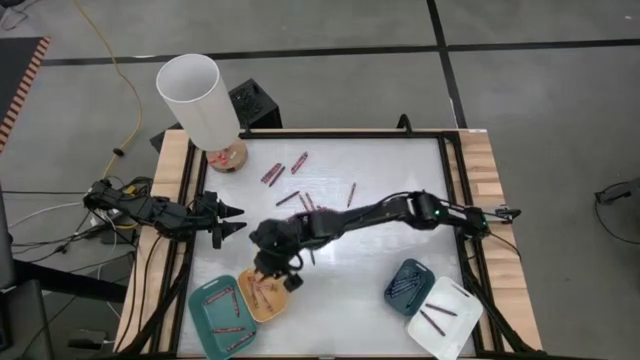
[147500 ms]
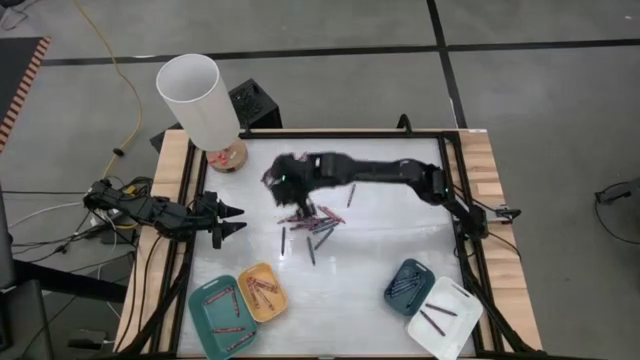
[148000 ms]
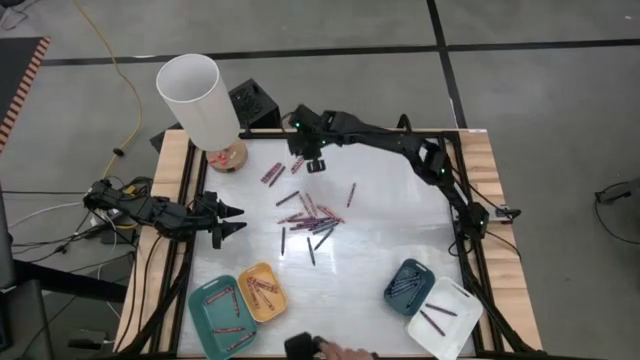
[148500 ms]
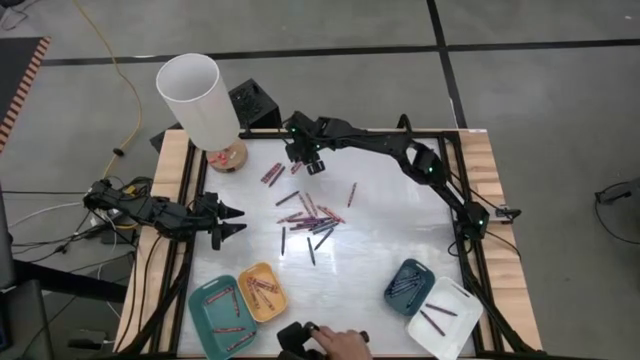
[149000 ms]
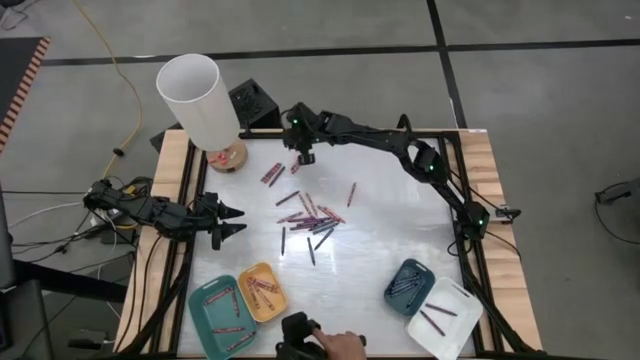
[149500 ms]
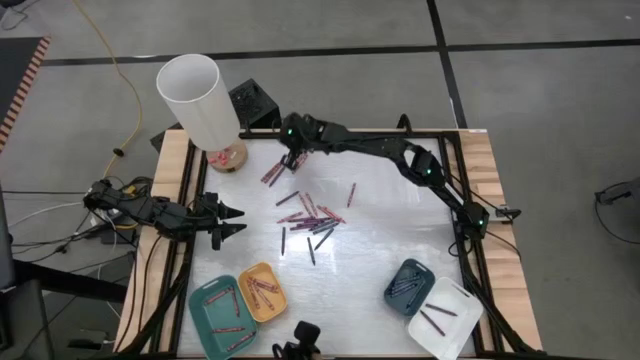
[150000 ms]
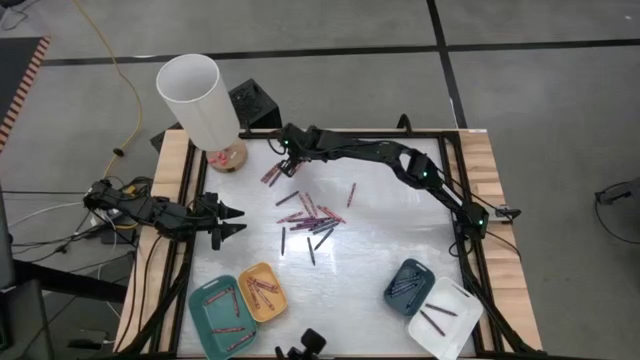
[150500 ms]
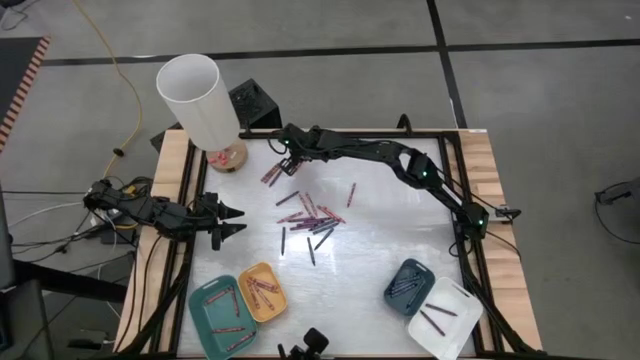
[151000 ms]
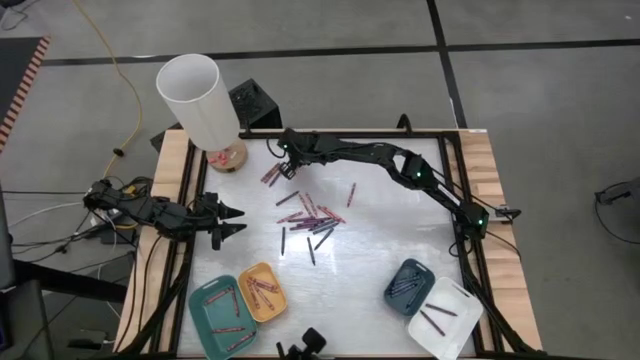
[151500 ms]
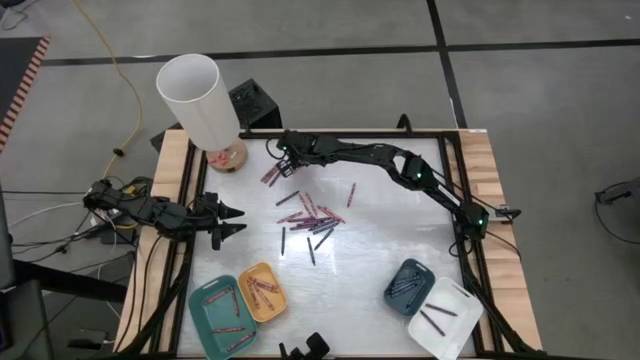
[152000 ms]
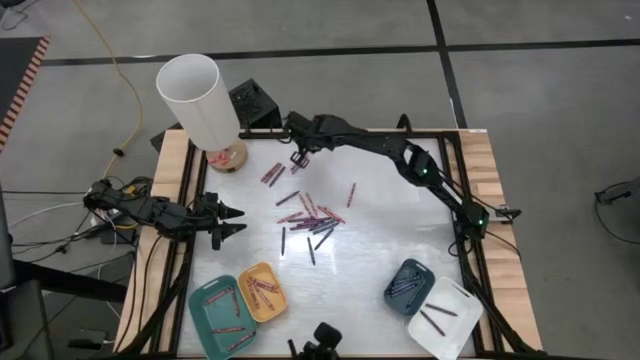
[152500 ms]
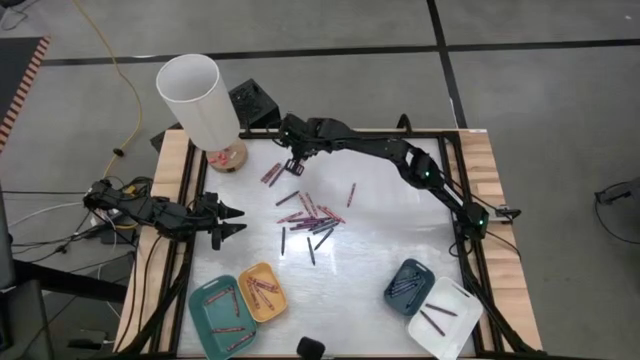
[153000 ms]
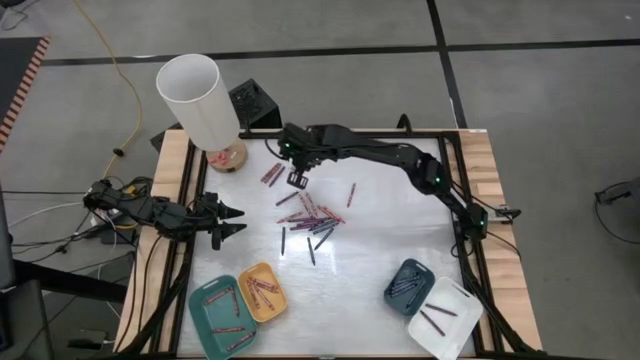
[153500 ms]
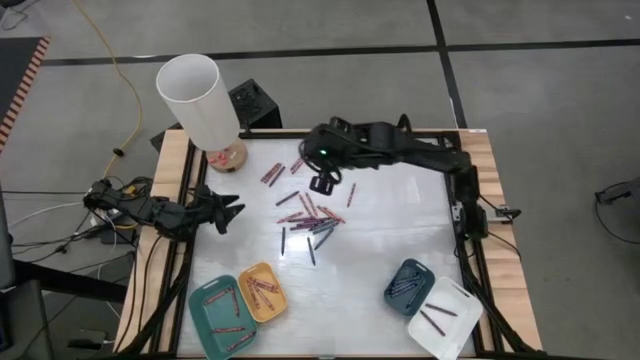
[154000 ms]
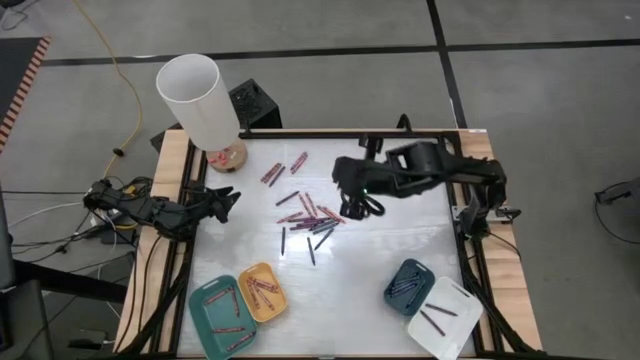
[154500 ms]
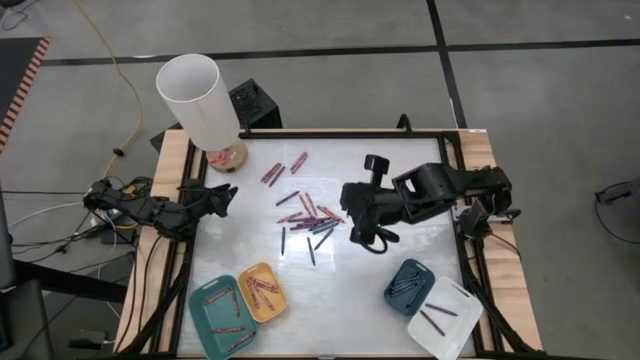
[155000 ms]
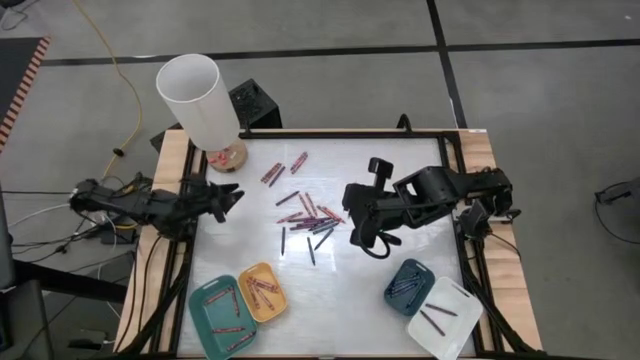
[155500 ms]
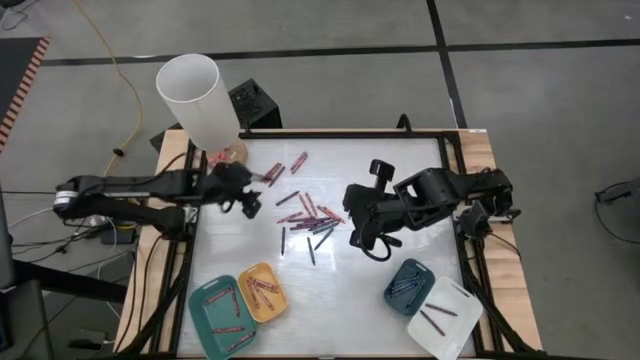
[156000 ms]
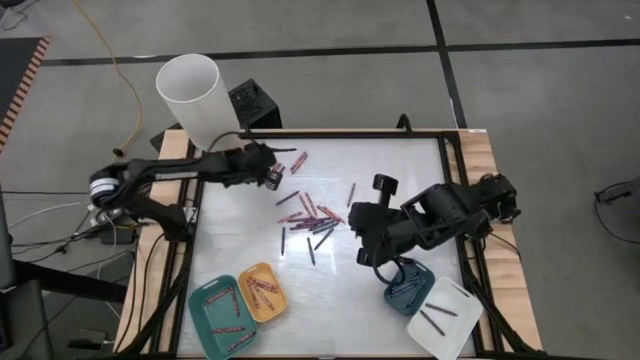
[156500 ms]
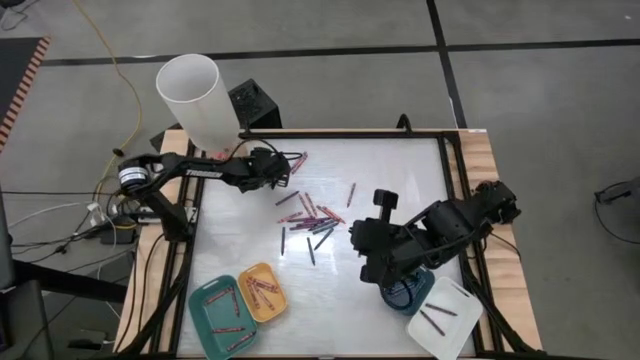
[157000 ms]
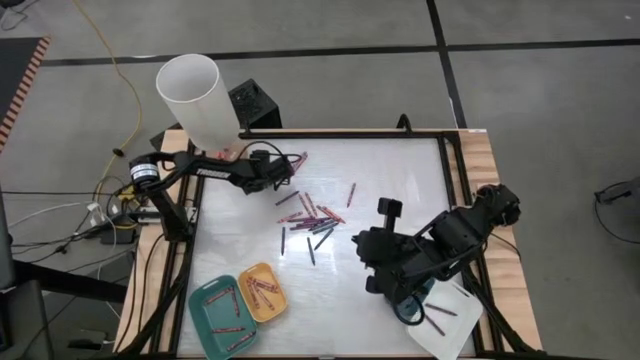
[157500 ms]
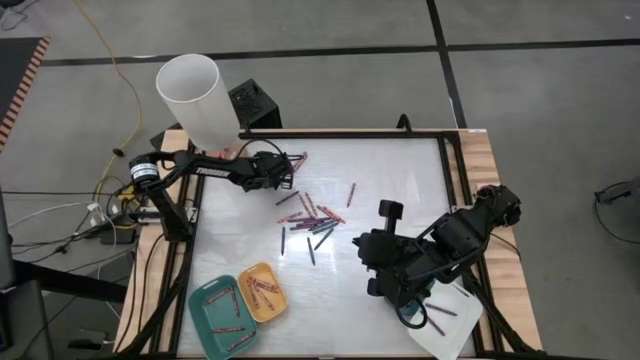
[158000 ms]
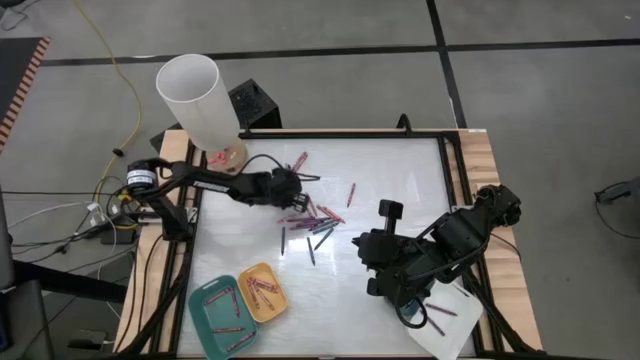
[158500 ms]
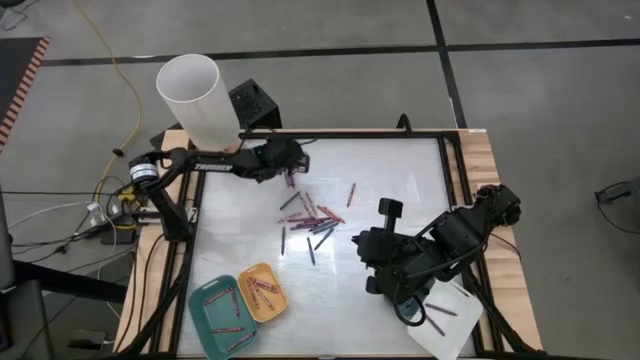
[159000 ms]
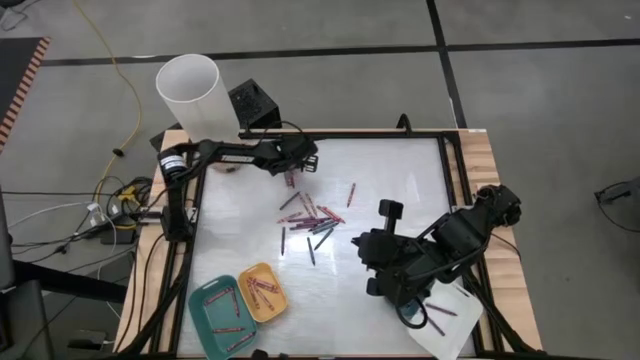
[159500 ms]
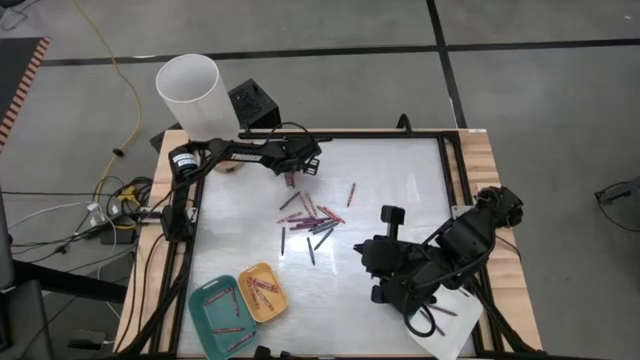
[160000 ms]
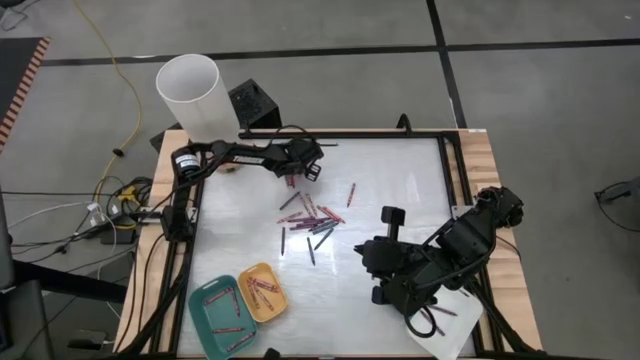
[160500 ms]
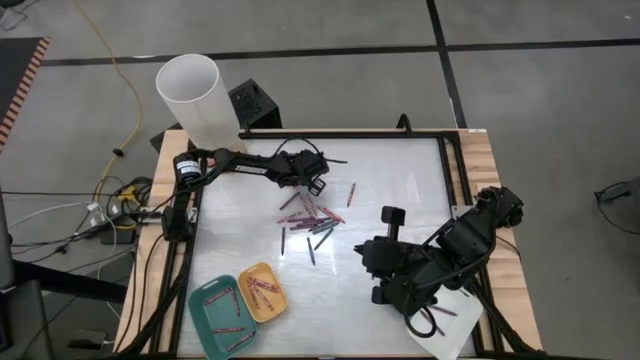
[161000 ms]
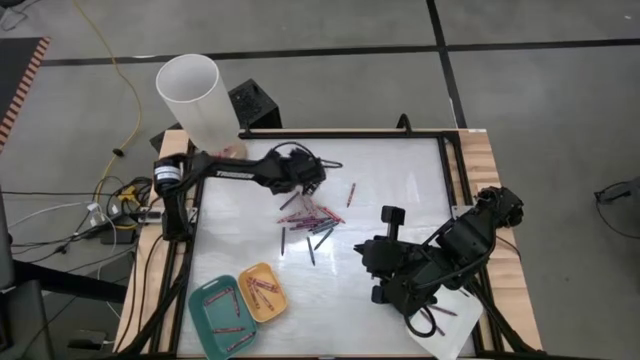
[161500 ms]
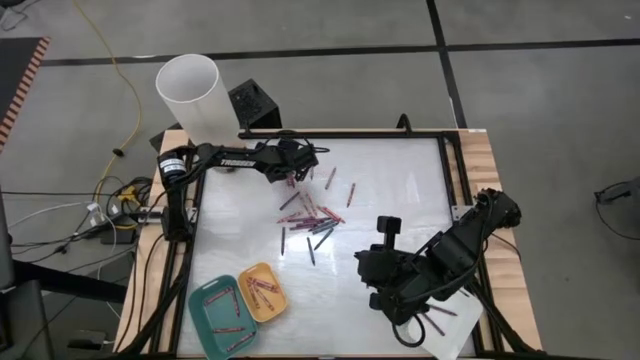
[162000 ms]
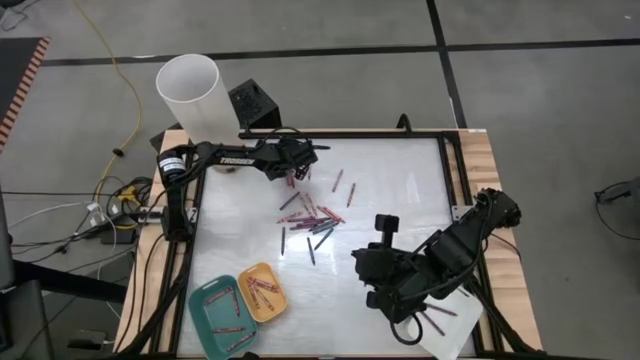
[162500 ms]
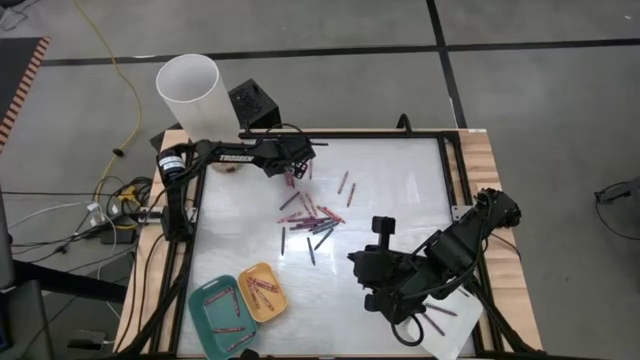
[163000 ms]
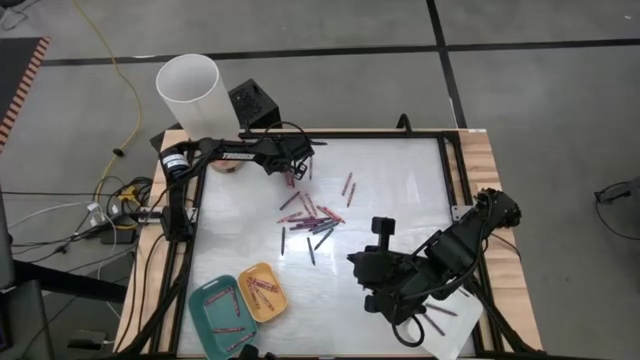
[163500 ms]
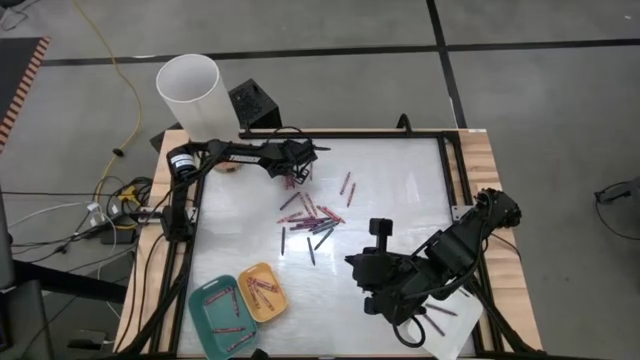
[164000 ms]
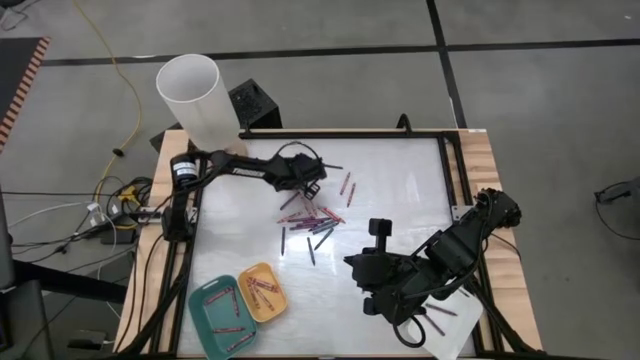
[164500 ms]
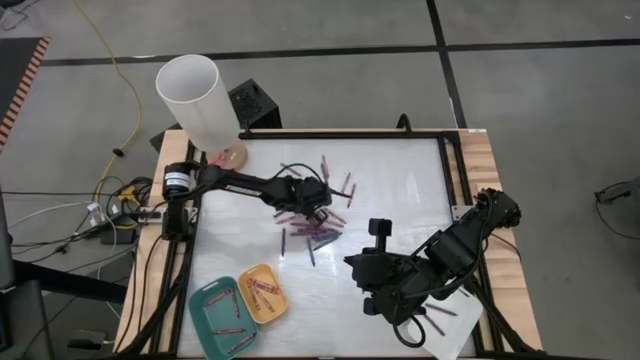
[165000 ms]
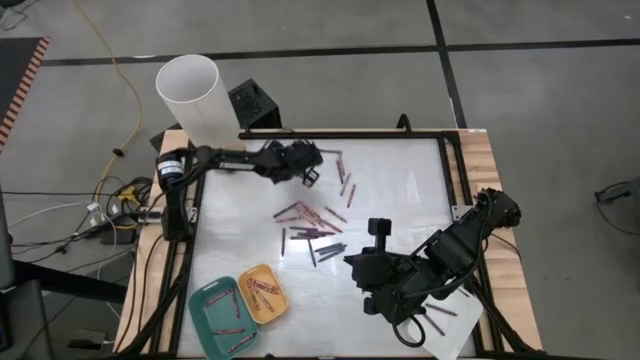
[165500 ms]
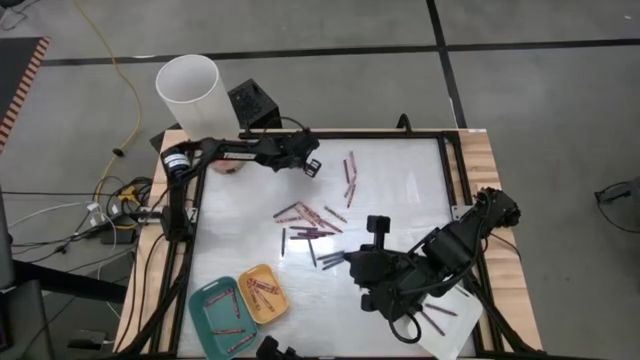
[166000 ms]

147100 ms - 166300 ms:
Task: Sort crayons
Adjust the crayons
